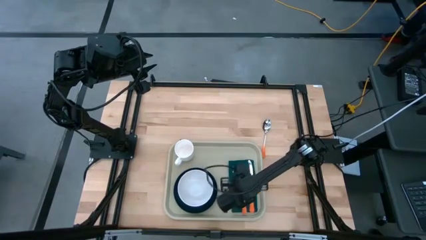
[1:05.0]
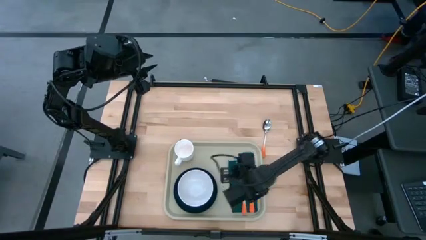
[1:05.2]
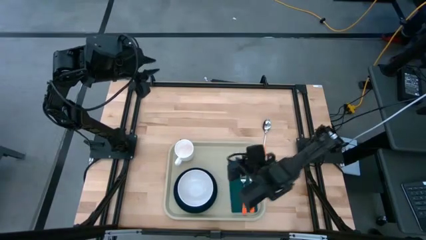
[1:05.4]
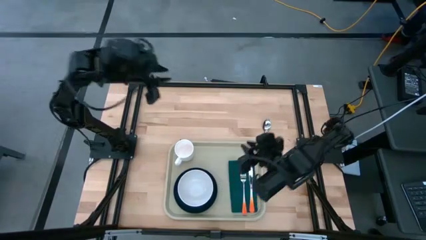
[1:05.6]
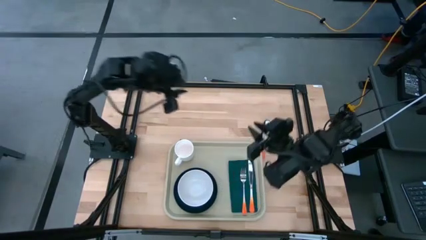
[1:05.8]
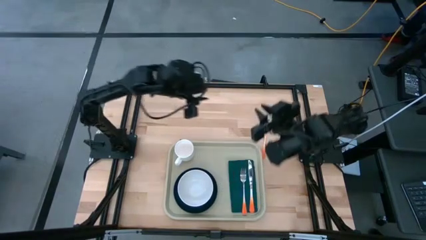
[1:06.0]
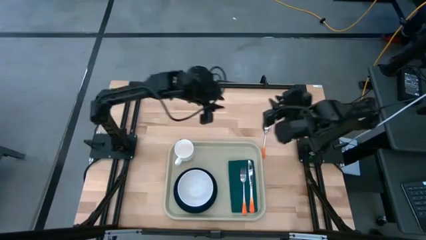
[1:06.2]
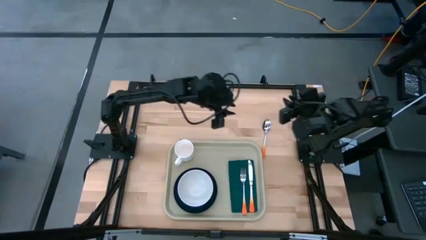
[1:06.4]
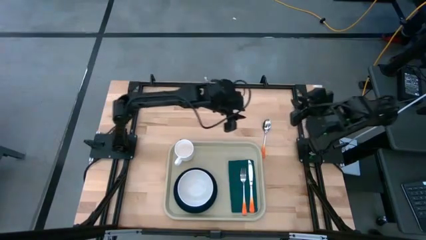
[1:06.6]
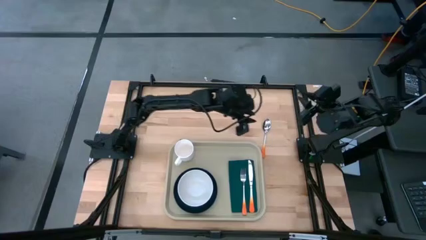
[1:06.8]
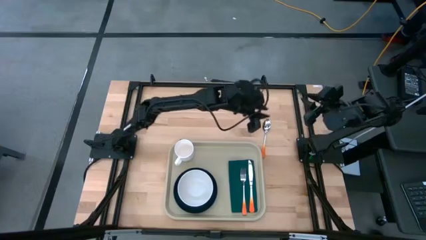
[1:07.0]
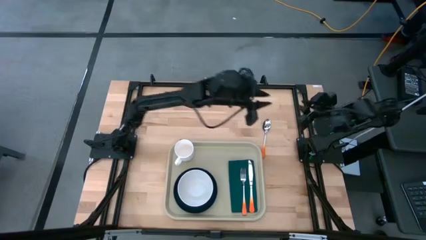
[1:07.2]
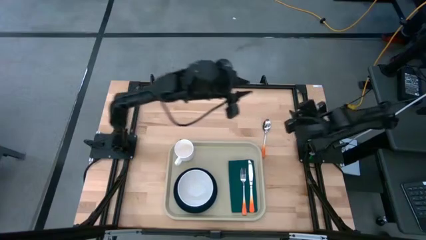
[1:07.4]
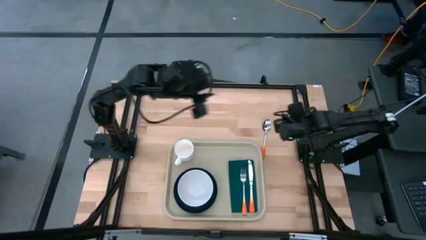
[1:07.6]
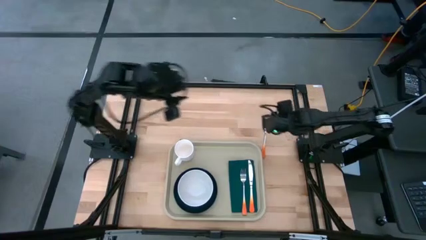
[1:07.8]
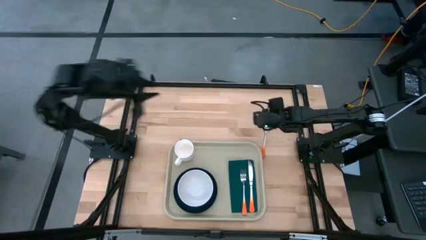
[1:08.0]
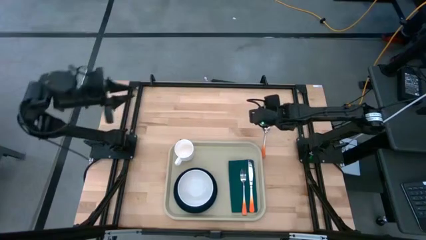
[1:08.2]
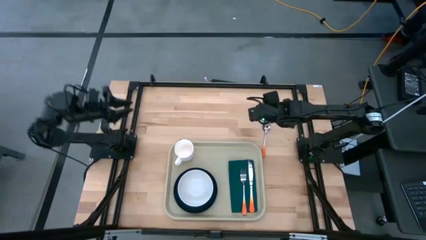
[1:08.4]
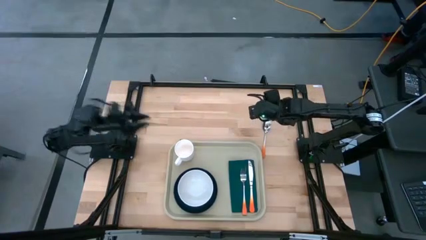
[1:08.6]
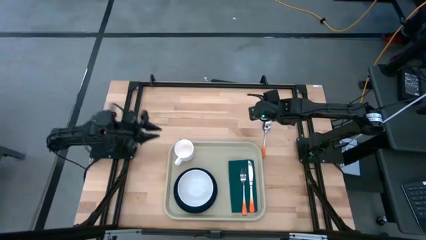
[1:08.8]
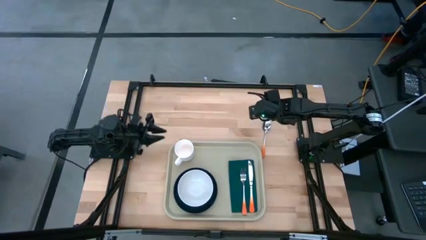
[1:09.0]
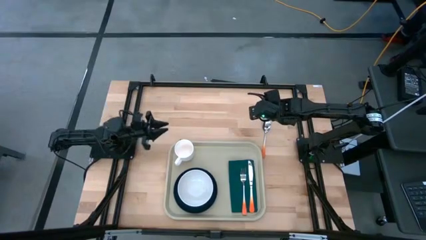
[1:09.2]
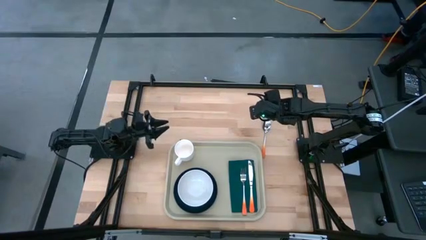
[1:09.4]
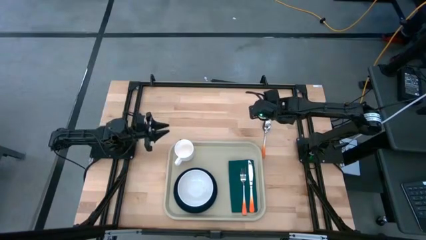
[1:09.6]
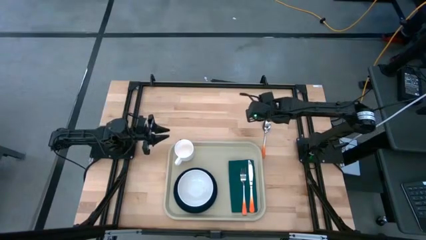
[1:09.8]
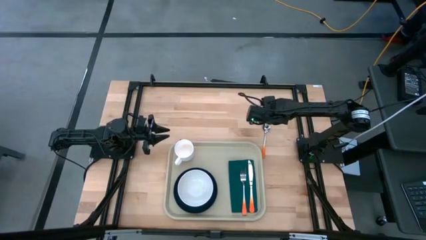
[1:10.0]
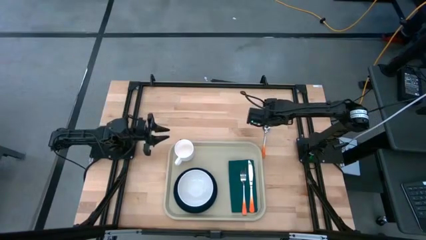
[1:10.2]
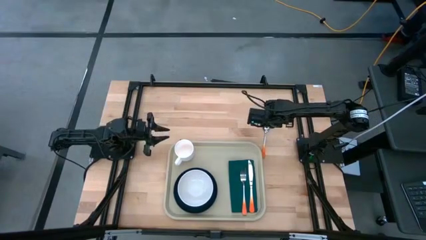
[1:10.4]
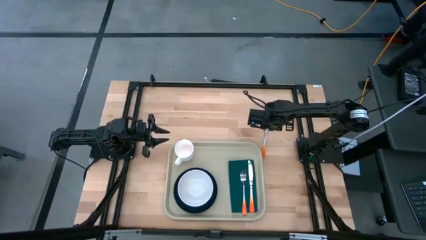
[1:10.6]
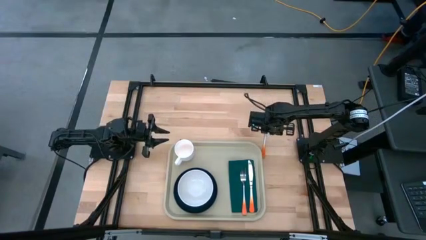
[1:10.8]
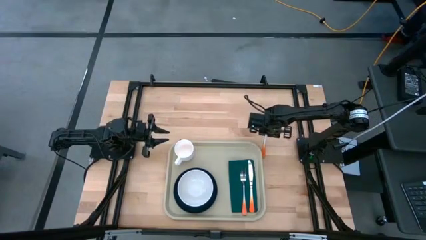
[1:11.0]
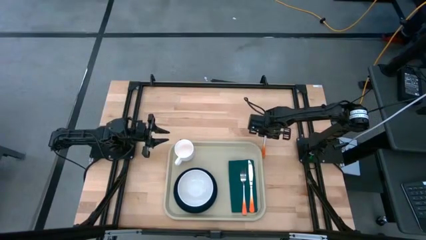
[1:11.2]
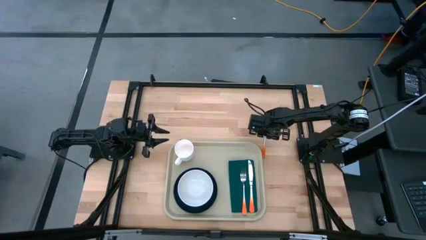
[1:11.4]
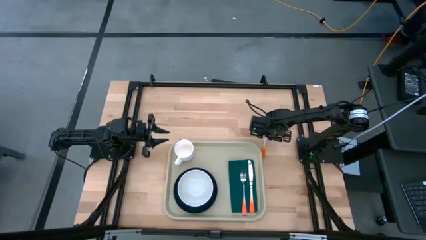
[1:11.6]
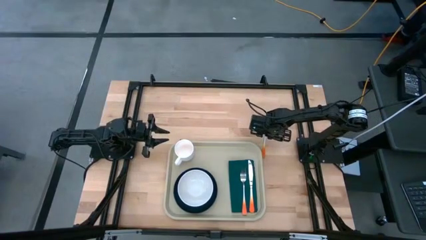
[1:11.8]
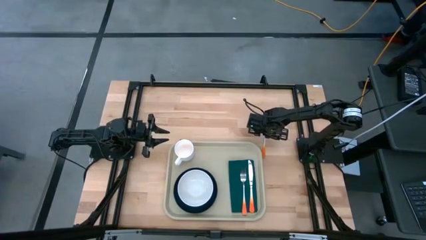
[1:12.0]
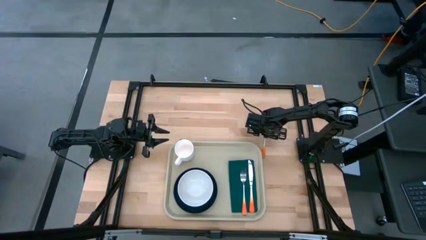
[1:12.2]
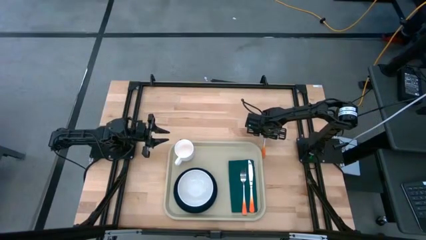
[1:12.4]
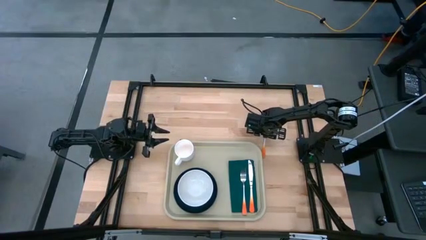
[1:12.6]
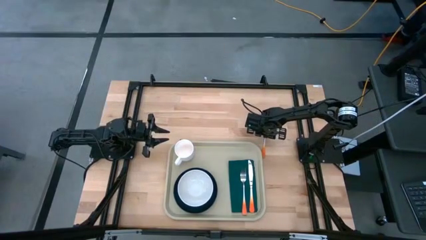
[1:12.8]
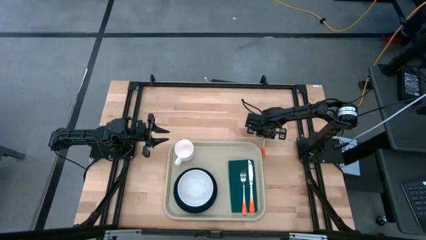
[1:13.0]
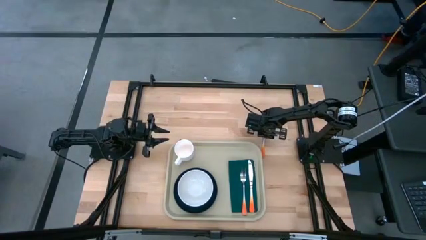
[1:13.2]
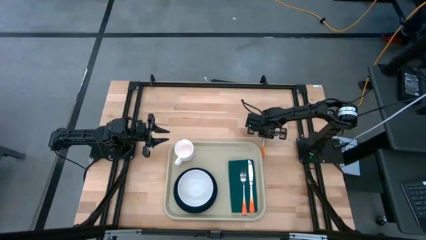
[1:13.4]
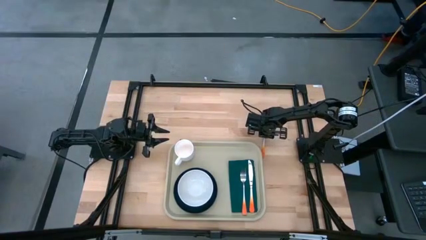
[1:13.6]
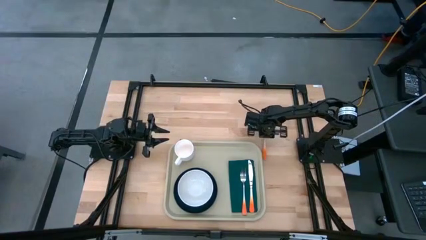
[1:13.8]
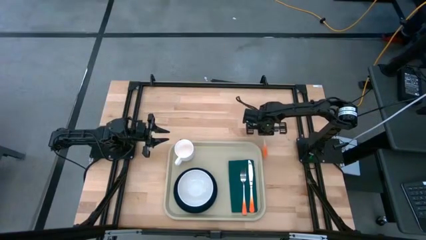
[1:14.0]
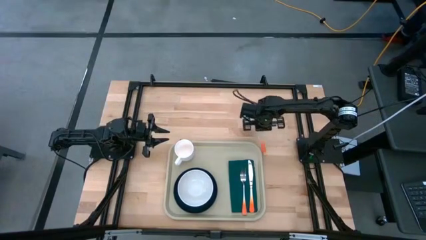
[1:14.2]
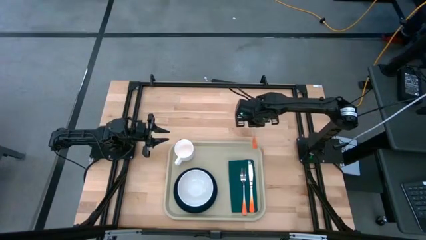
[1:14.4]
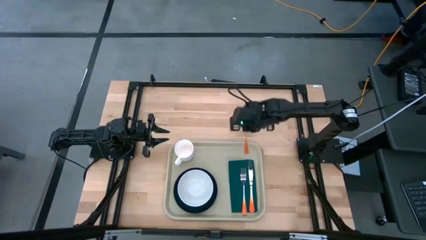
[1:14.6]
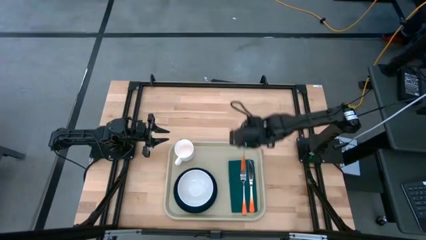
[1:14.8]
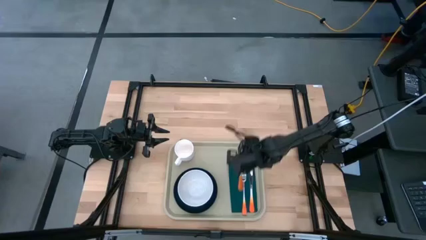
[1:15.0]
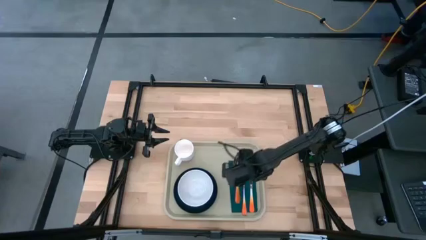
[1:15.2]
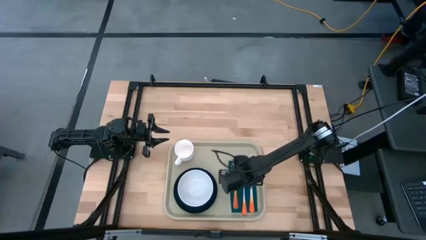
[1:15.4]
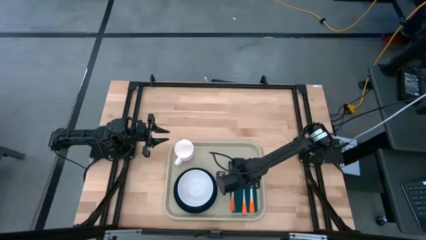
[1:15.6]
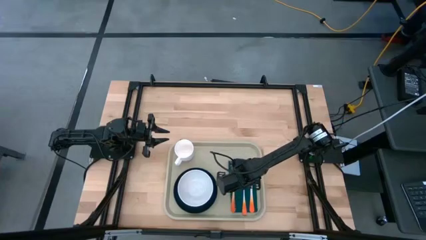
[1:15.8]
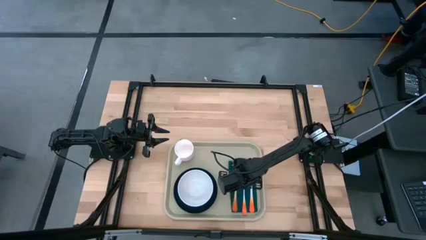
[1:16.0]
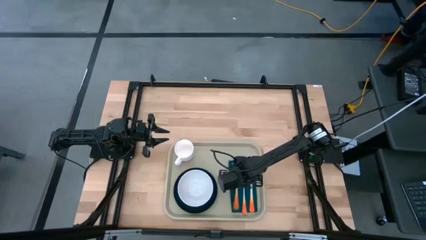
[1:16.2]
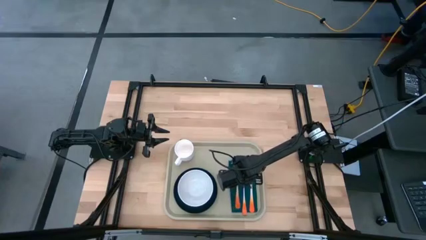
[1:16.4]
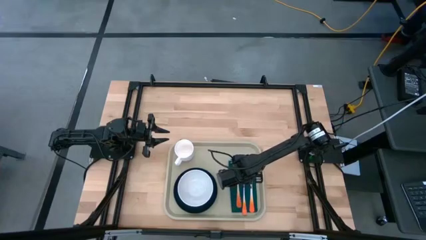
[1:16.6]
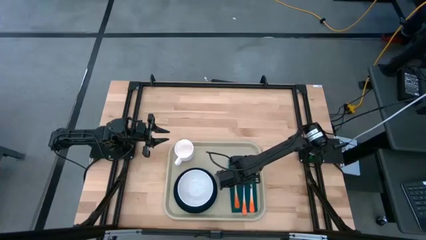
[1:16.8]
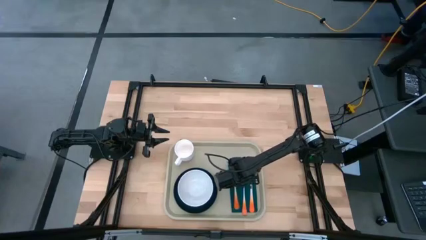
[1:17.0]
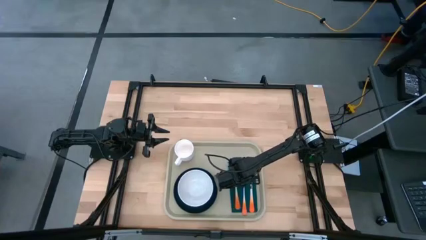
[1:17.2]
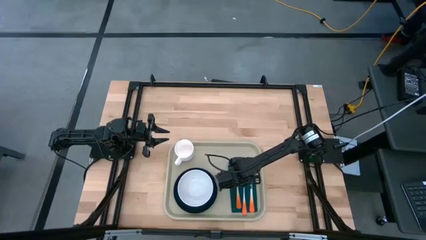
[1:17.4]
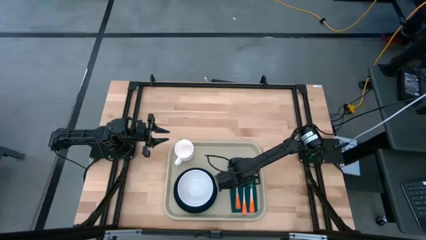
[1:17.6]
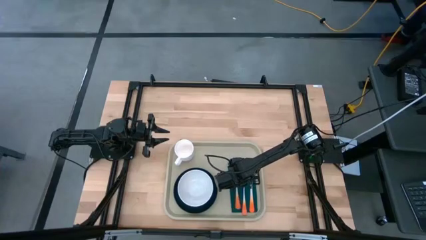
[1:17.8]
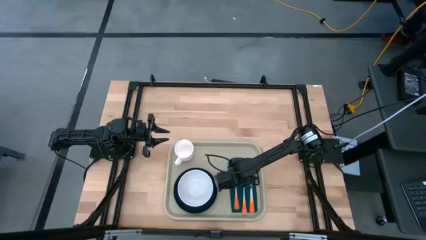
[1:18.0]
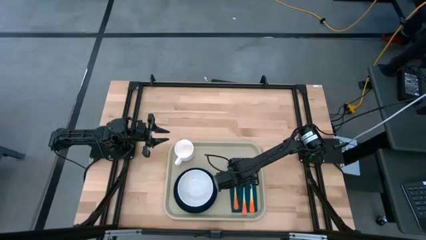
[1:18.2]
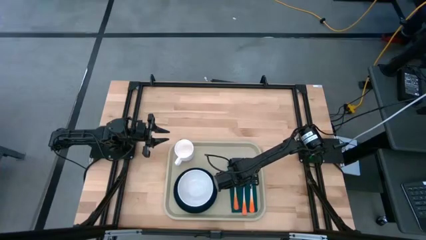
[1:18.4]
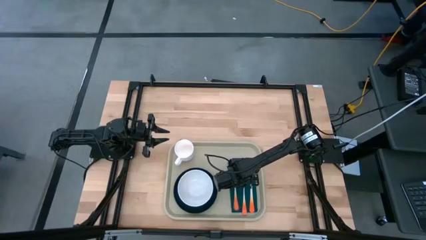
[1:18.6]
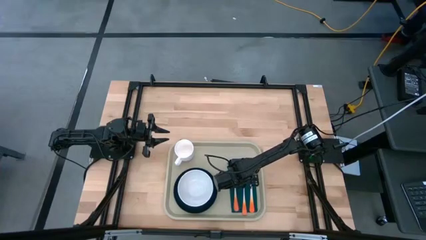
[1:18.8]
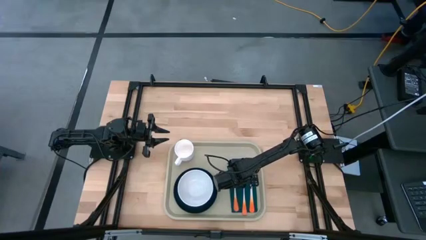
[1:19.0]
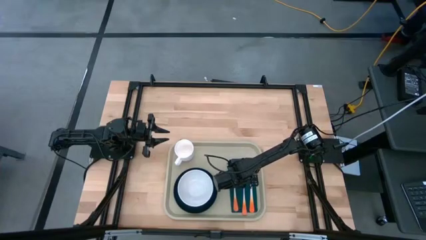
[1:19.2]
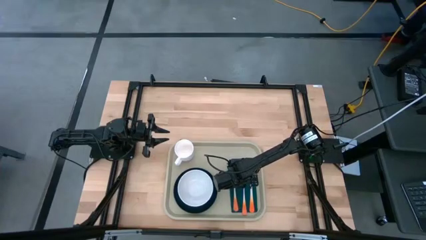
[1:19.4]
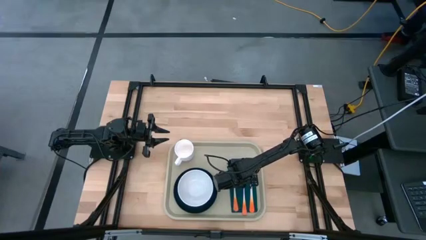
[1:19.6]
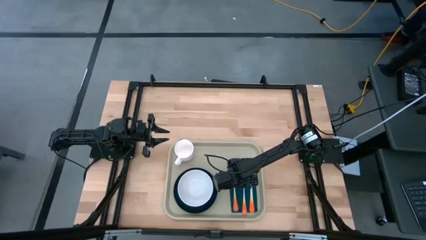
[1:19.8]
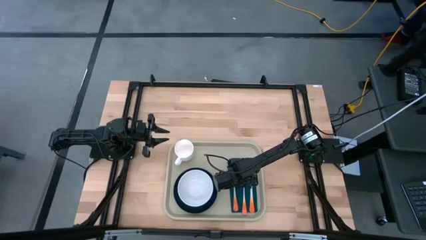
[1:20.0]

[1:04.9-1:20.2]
Task: Set up tray
Put the orange spoon on top of the dark green napkin to the left of the orange fork
